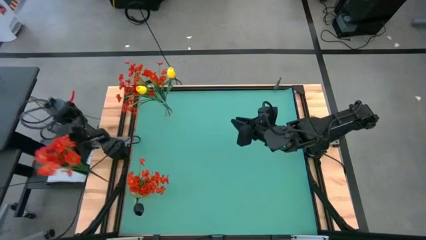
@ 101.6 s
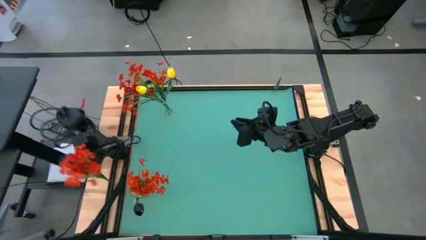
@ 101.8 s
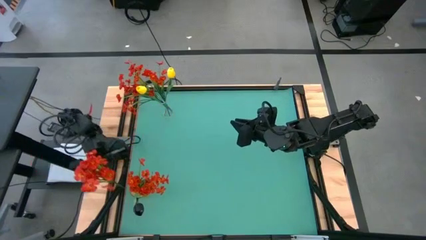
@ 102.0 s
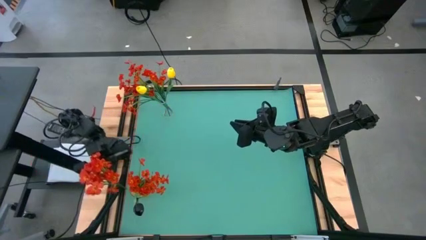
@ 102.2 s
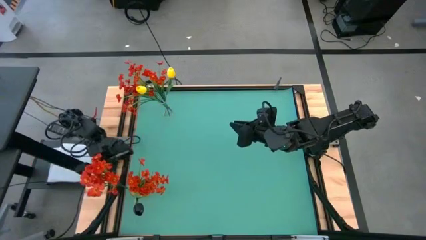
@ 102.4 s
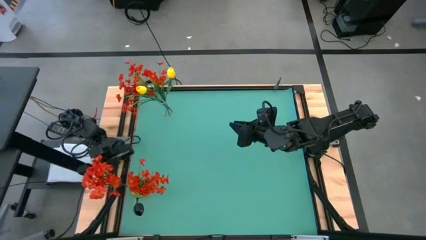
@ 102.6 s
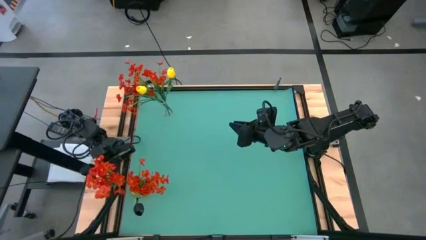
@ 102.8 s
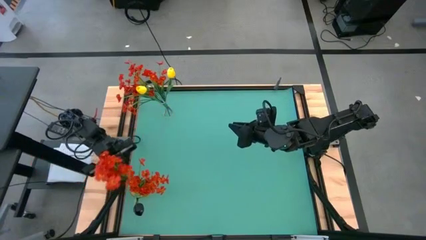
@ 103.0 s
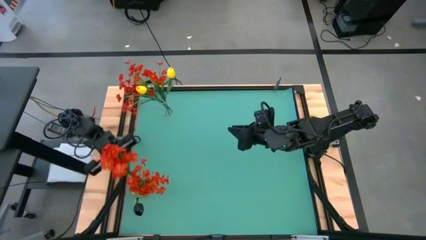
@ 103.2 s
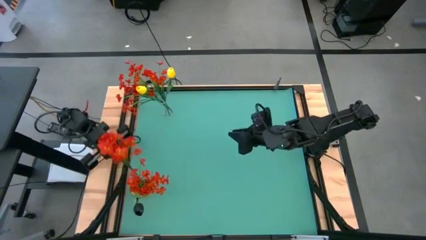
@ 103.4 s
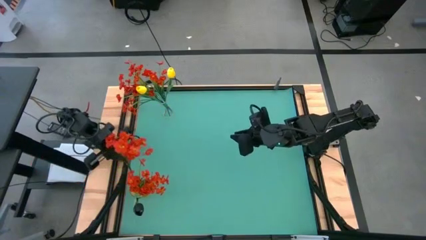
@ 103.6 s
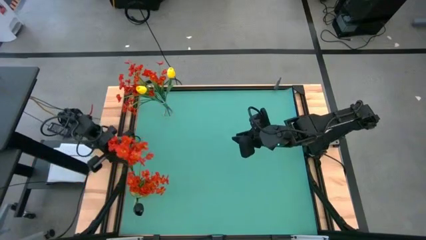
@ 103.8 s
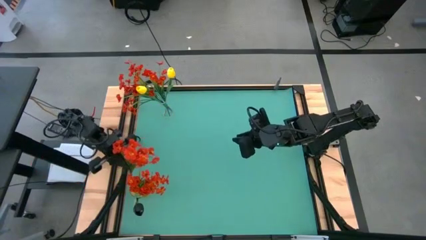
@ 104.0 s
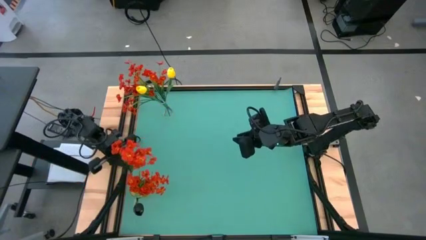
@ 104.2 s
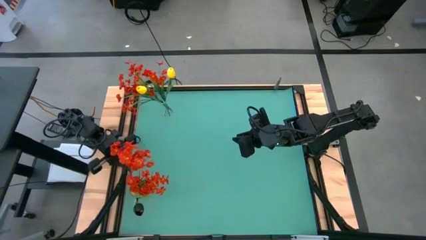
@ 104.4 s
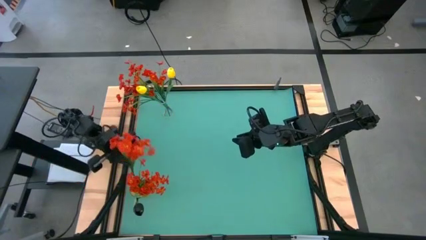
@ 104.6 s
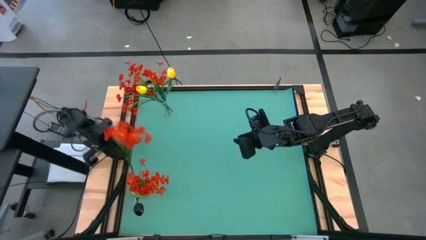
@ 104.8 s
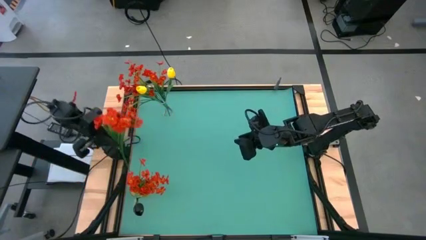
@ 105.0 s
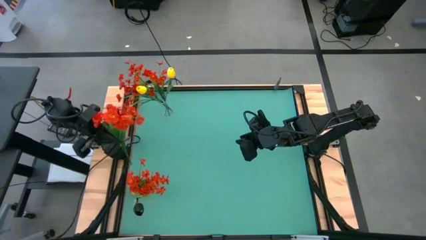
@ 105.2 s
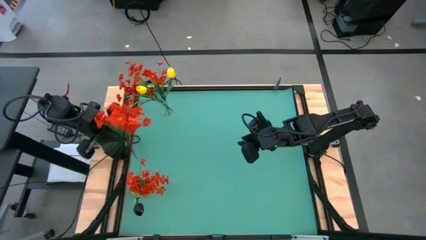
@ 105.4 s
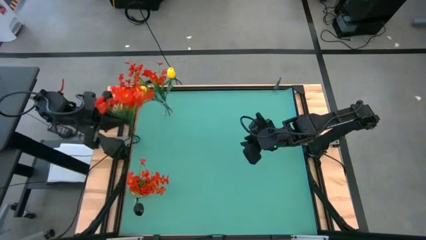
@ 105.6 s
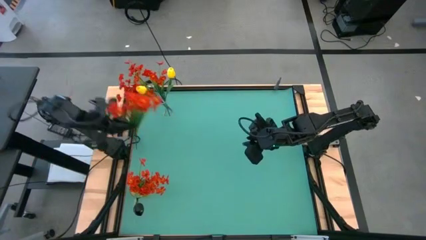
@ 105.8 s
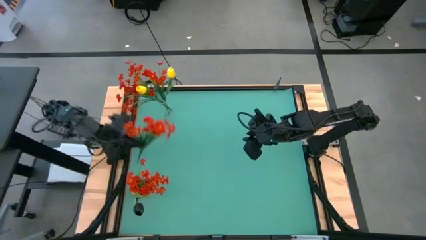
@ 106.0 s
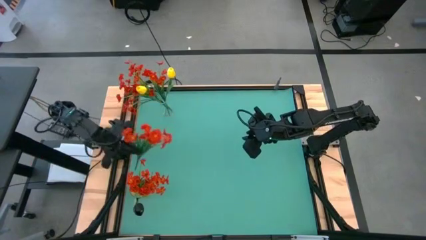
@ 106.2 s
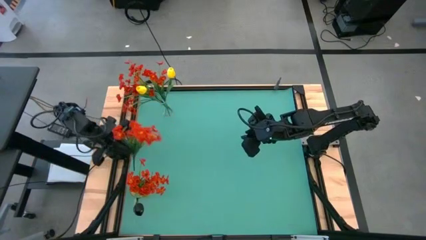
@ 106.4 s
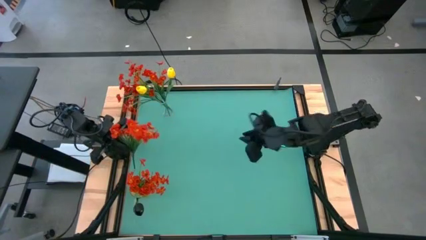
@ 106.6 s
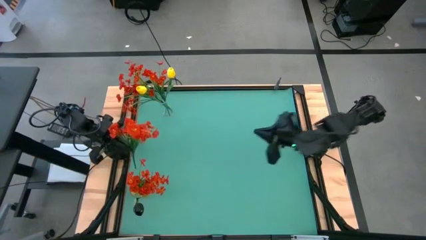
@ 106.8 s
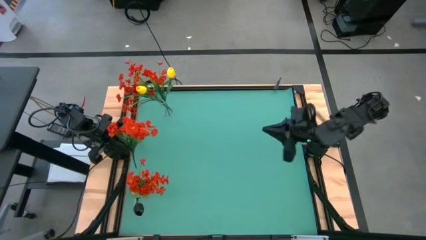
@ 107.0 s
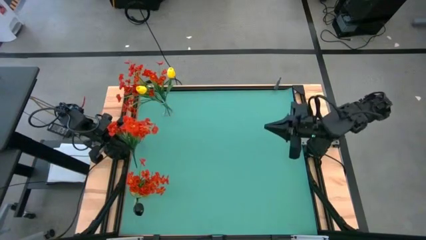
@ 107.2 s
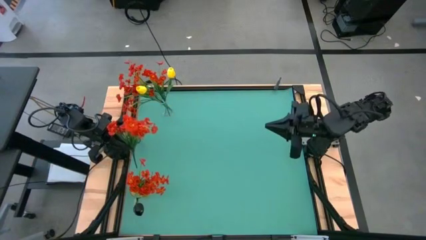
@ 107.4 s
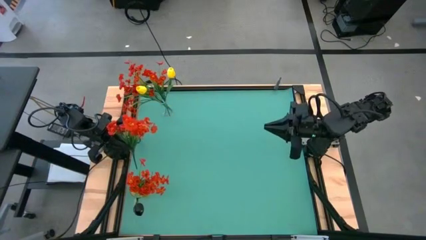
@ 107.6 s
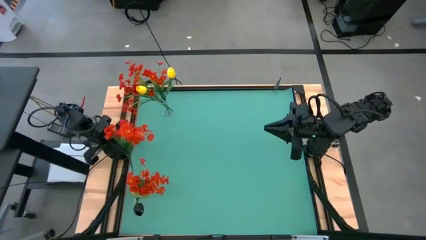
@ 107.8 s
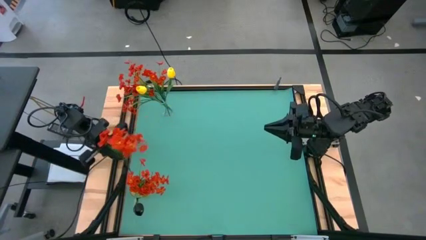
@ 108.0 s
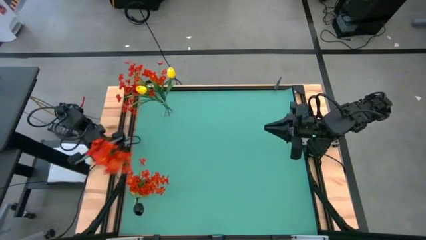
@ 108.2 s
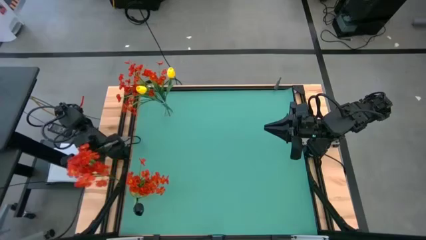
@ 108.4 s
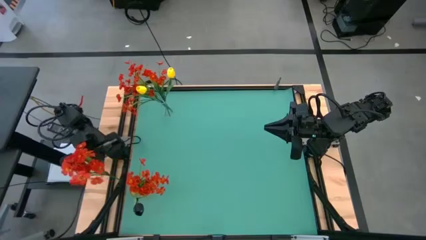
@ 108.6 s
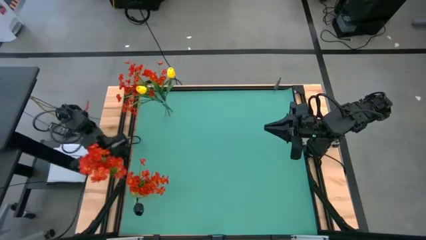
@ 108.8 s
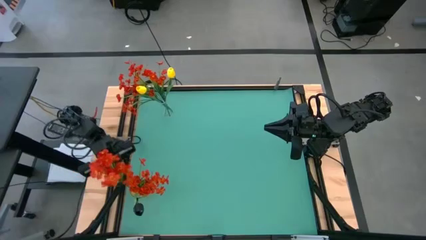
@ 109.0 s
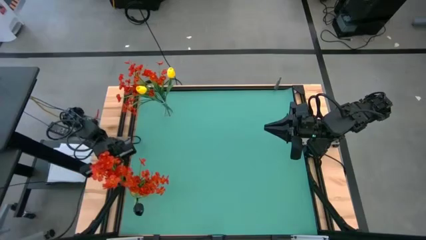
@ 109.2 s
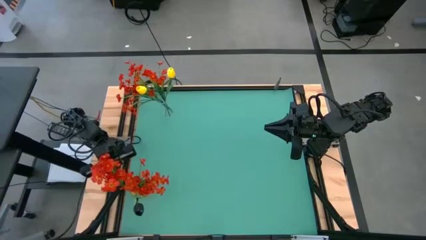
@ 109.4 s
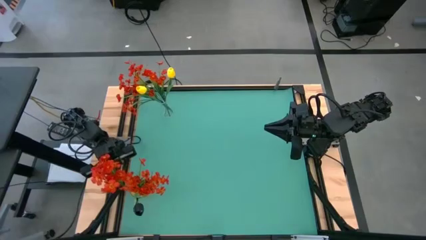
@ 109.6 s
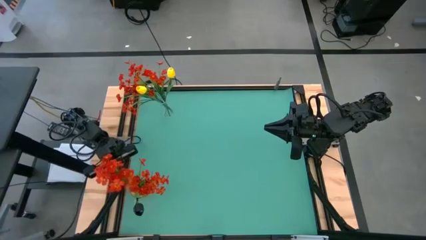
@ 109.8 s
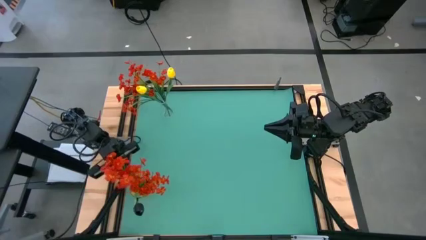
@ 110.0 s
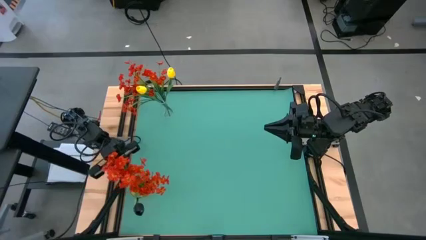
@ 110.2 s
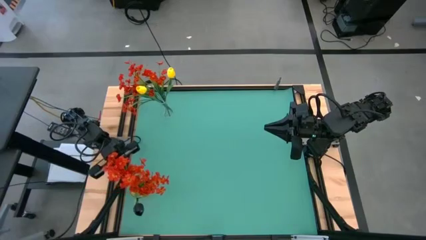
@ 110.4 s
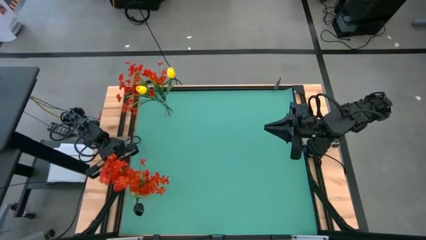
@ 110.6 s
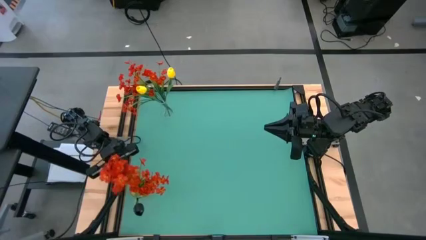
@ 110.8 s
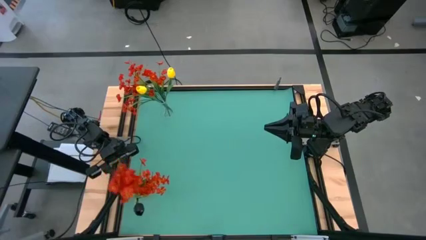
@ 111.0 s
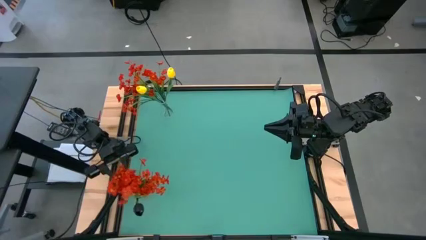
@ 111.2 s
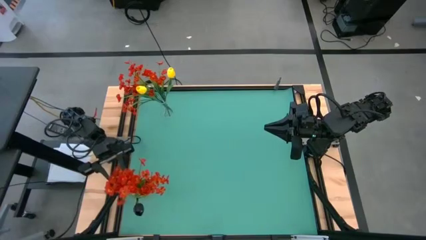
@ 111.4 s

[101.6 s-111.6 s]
Task: Sort flowers into vase by color
Put the red flowers into the yellow vase

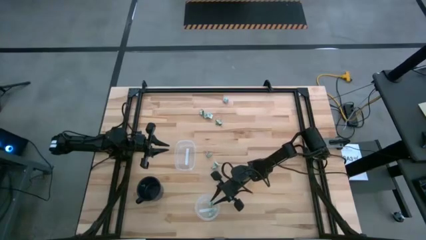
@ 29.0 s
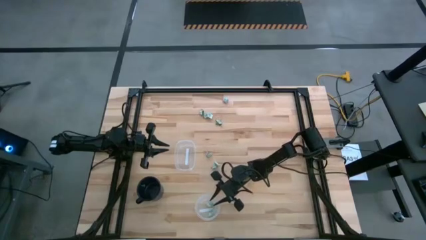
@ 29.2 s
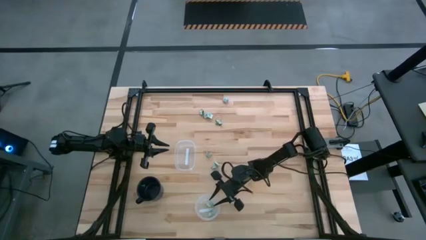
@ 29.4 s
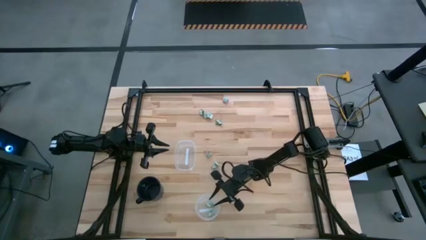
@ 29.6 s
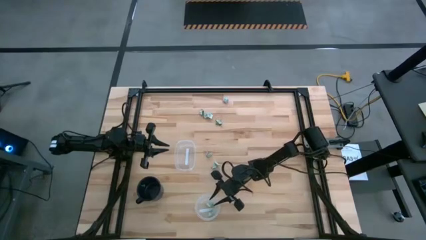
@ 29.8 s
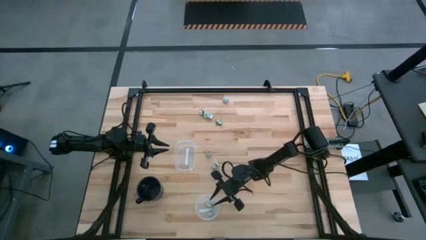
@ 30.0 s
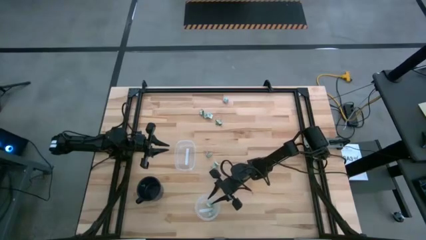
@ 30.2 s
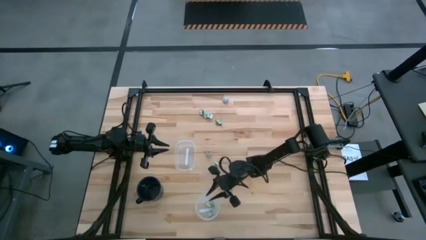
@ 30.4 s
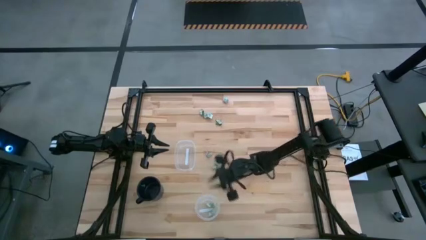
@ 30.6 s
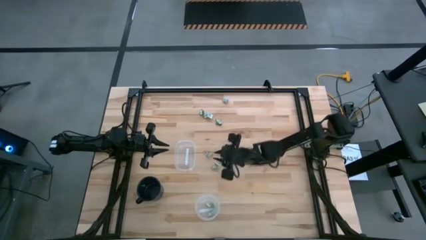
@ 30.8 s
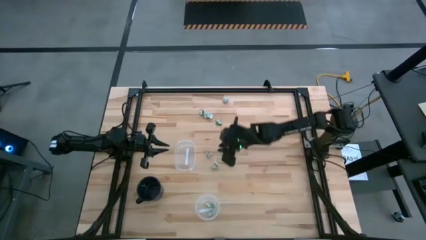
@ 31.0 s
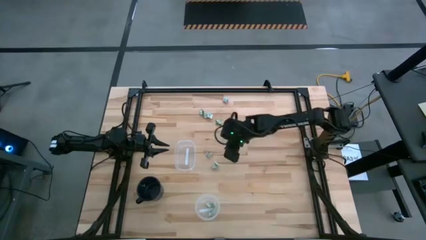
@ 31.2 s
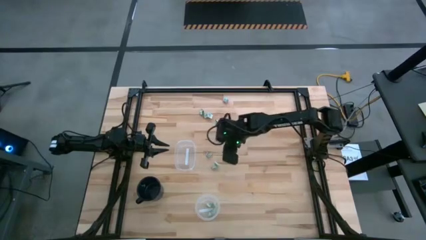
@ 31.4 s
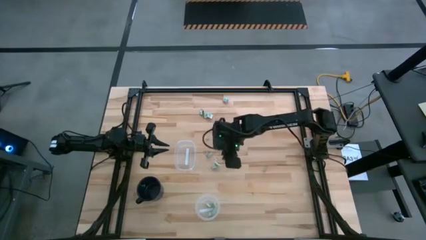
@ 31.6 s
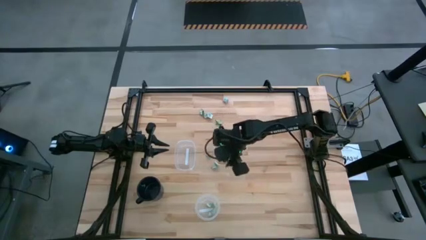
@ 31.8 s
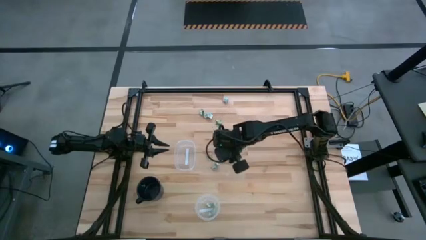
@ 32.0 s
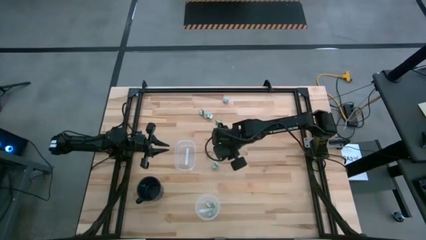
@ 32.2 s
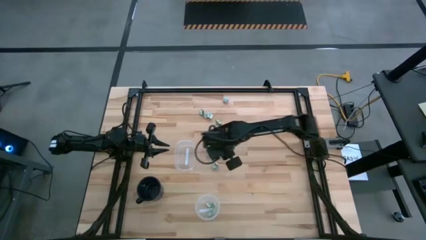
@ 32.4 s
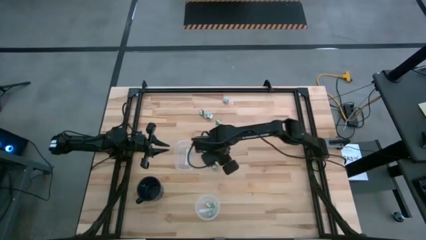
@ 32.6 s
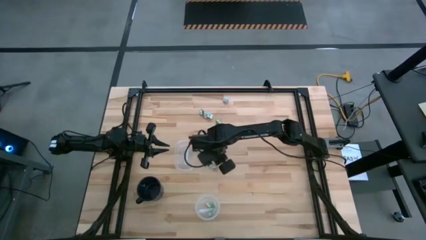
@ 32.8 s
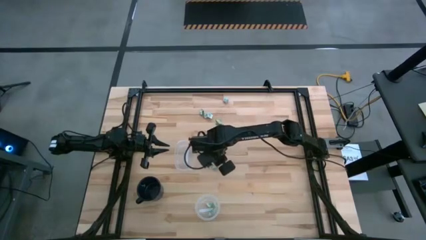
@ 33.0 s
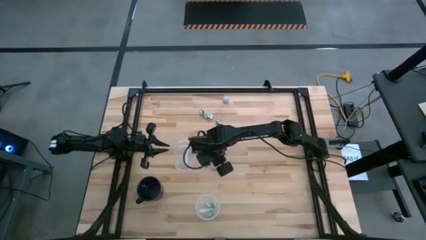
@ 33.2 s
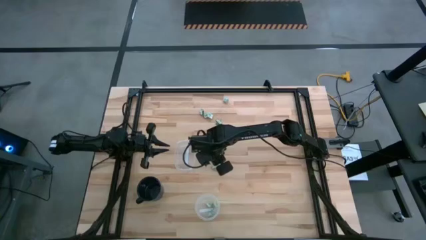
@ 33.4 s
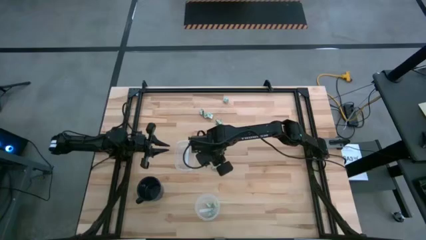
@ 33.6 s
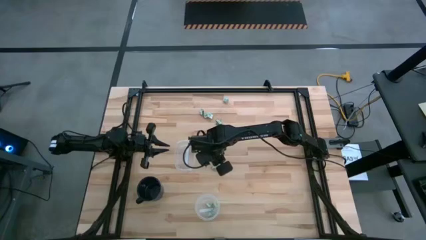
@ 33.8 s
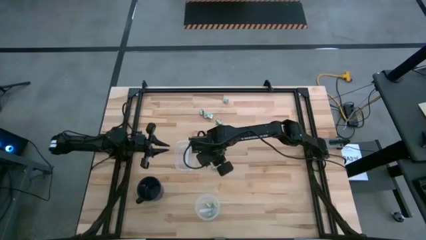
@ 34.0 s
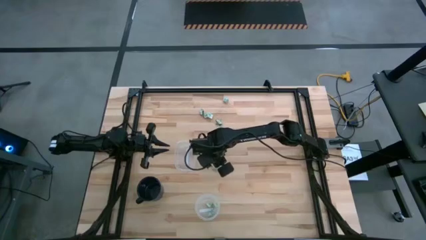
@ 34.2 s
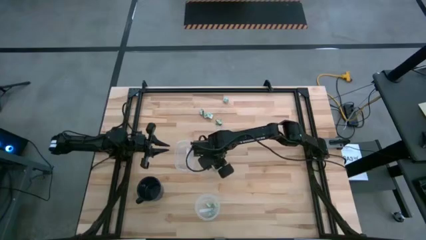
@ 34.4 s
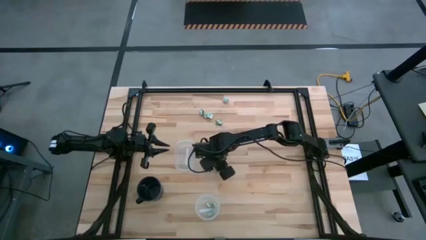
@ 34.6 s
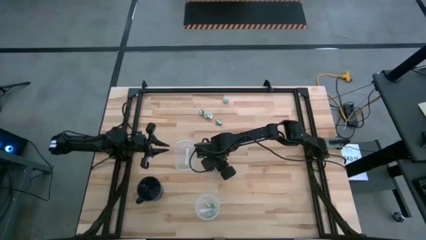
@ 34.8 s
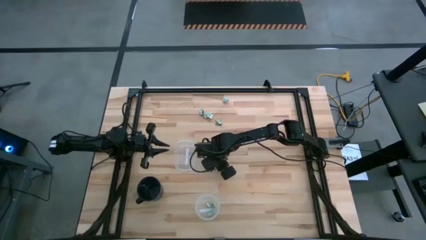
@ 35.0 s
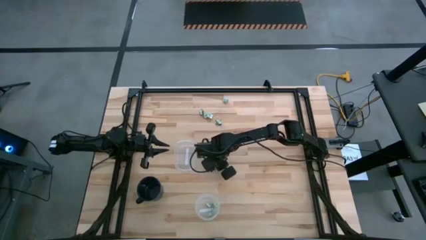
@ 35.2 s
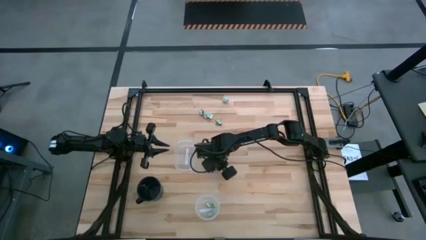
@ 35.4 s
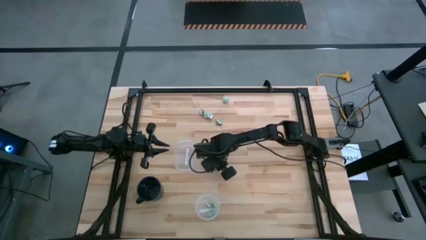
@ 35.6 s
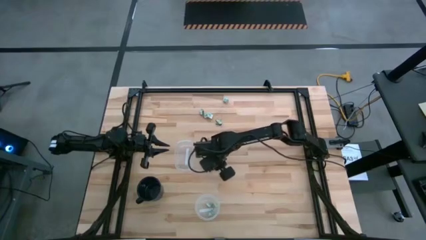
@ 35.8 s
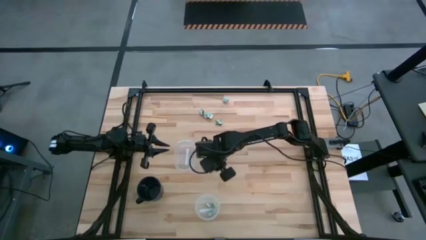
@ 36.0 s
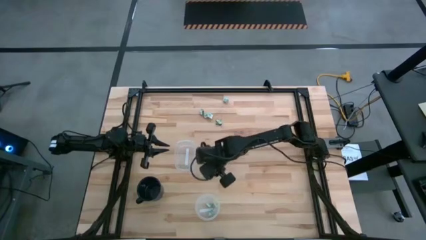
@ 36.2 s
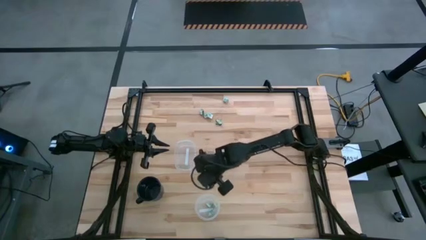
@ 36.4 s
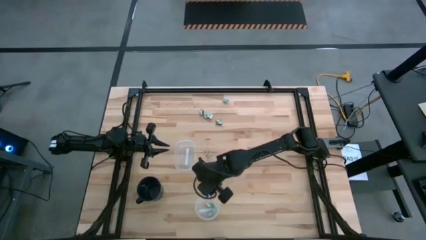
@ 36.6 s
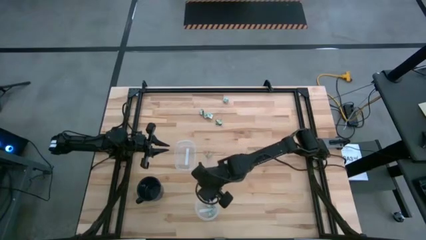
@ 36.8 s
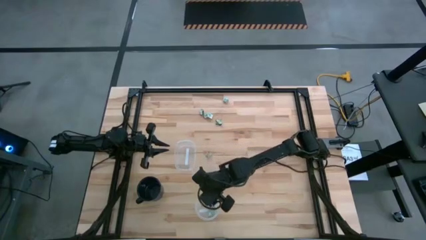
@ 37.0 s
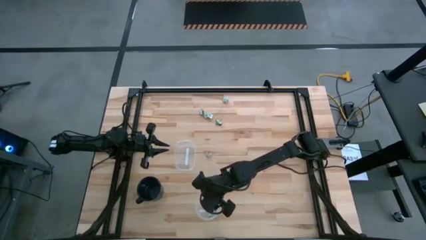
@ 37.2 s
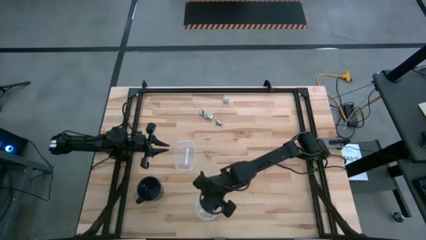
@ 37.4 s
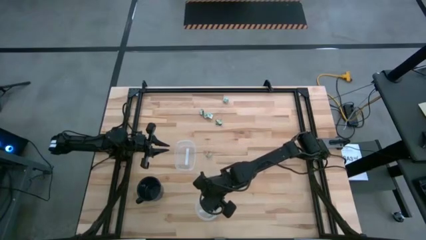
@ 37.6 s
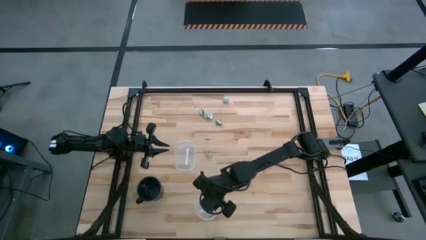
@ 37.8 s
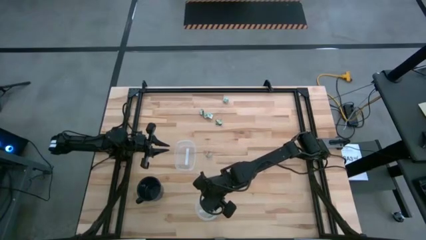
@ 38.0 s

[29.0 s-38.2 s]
Task: Pick and place Stevia / Truvia into bins
Put the stevia packet into the round transparent container
